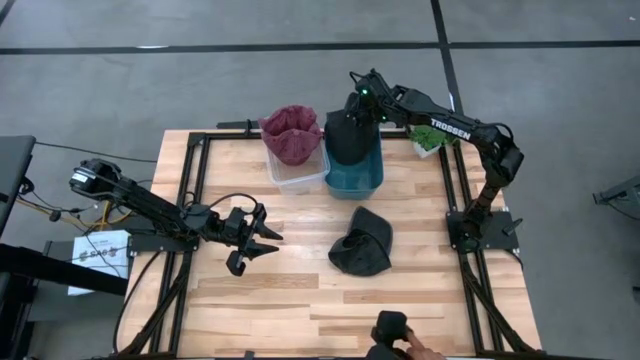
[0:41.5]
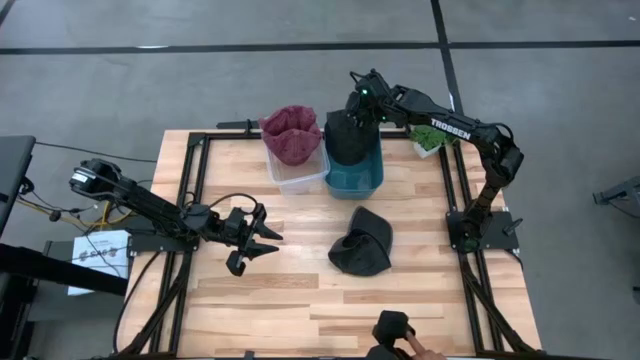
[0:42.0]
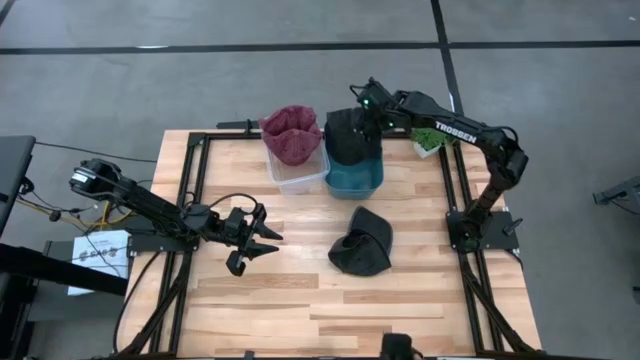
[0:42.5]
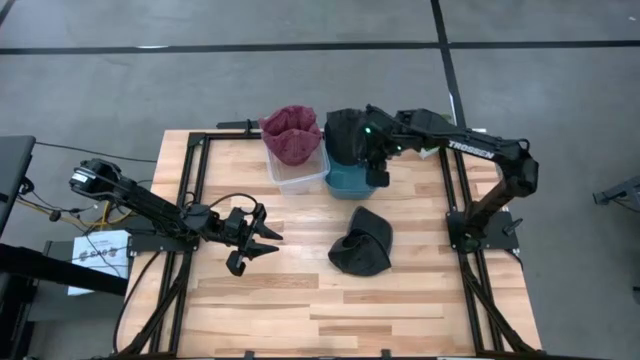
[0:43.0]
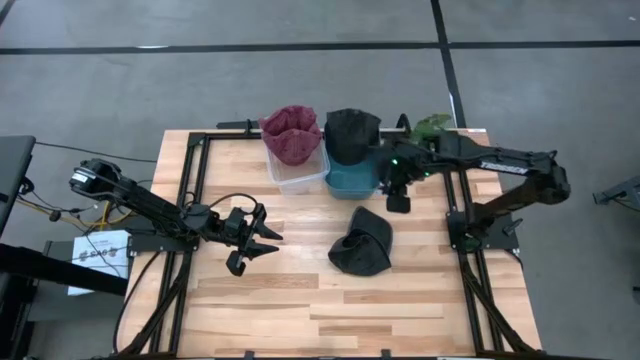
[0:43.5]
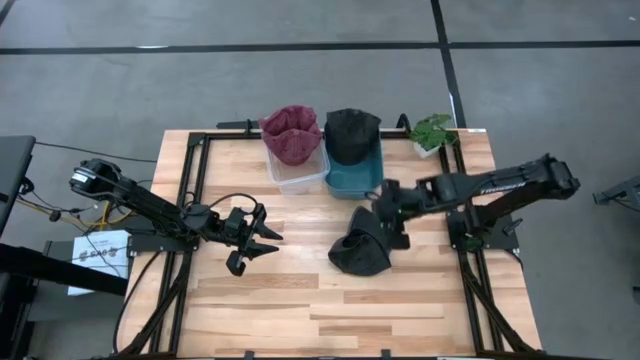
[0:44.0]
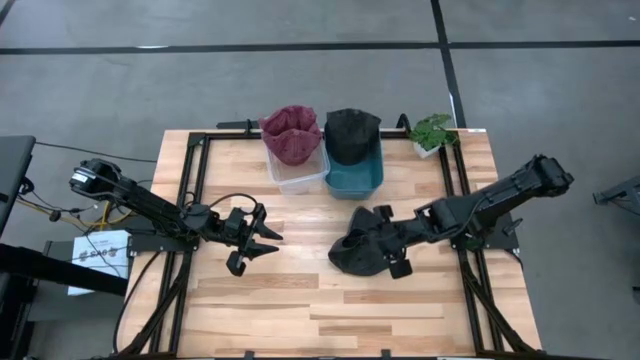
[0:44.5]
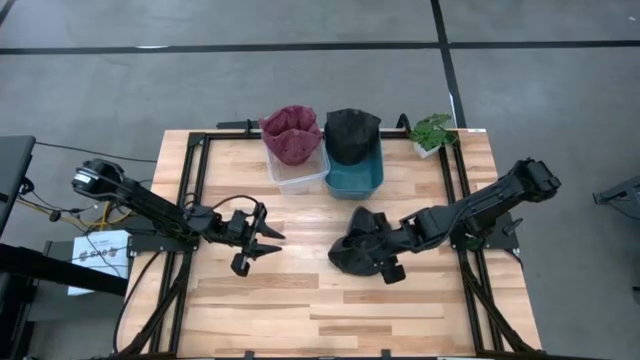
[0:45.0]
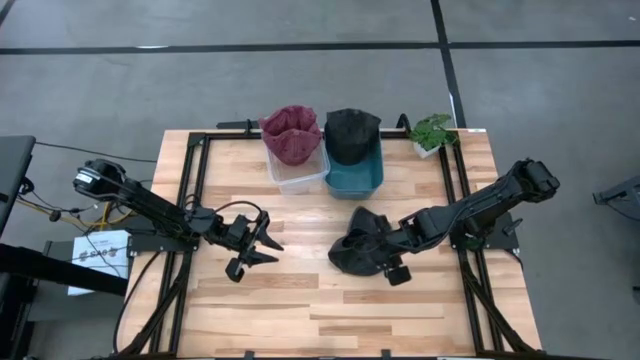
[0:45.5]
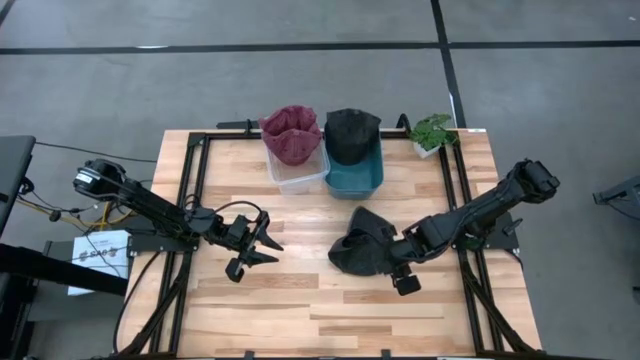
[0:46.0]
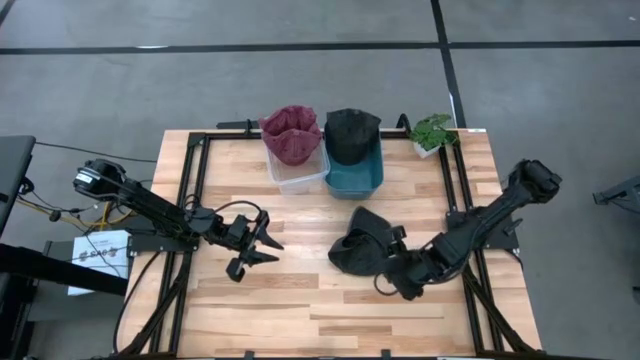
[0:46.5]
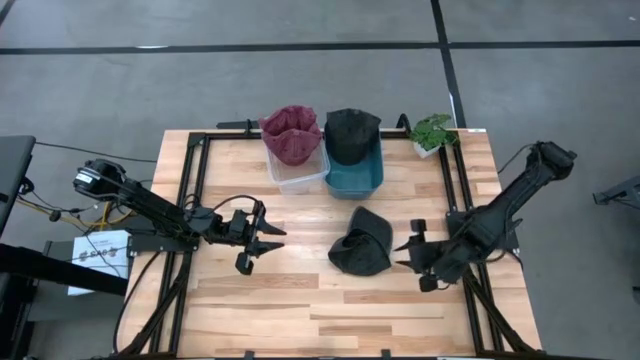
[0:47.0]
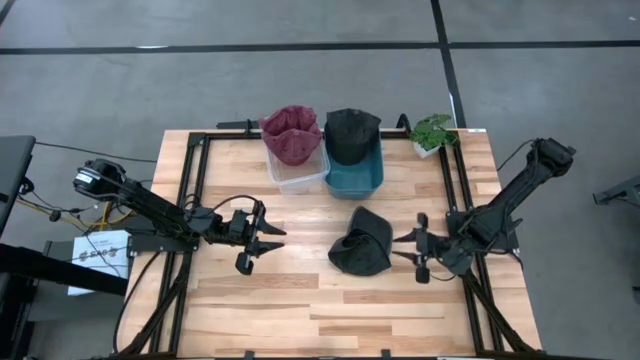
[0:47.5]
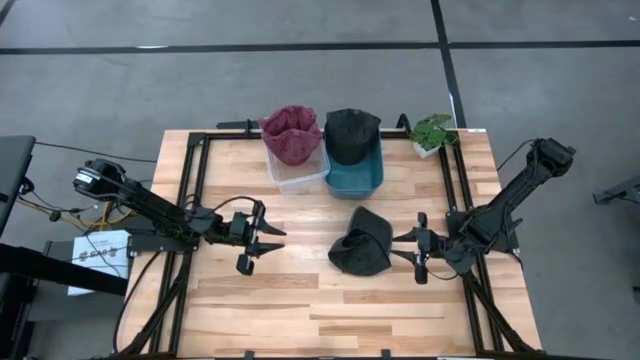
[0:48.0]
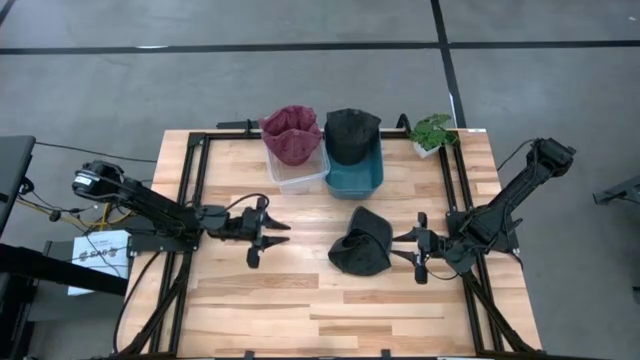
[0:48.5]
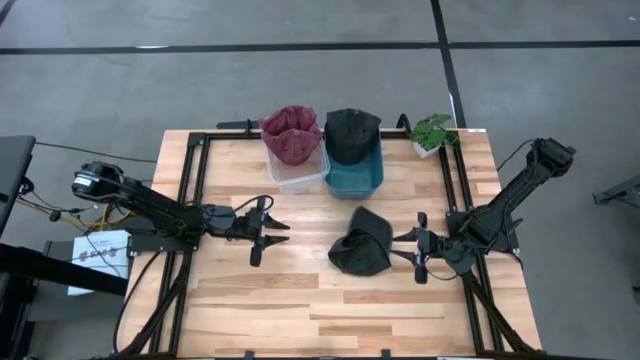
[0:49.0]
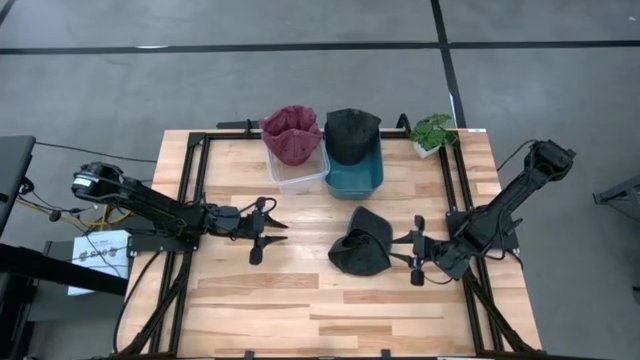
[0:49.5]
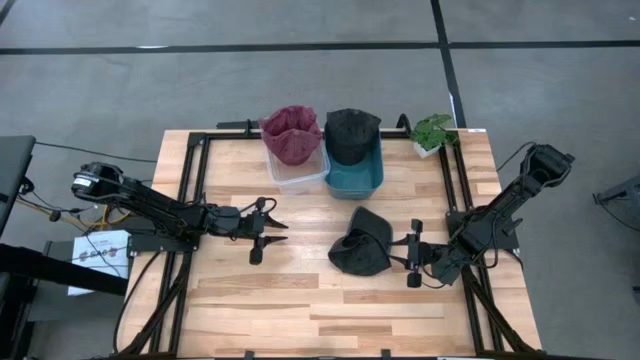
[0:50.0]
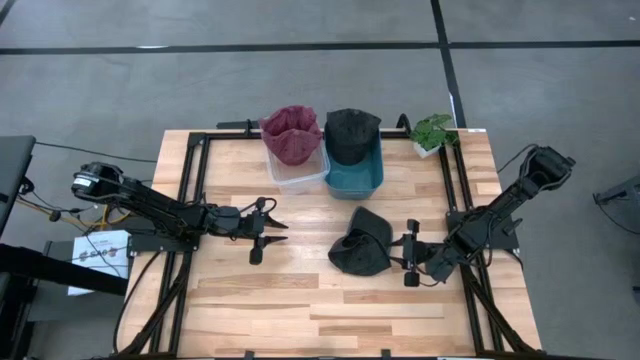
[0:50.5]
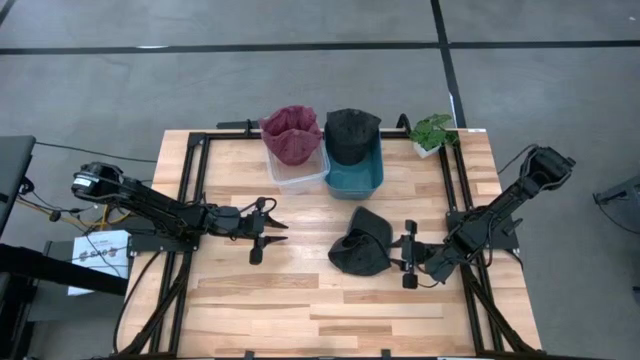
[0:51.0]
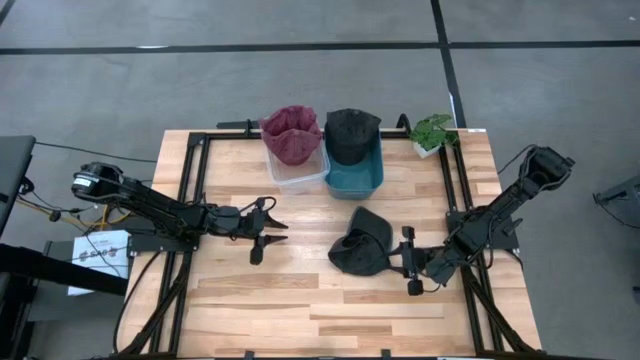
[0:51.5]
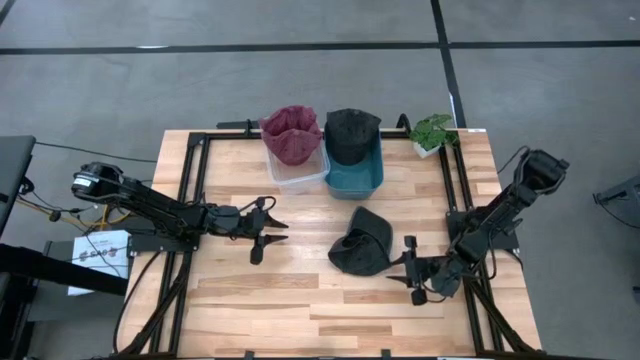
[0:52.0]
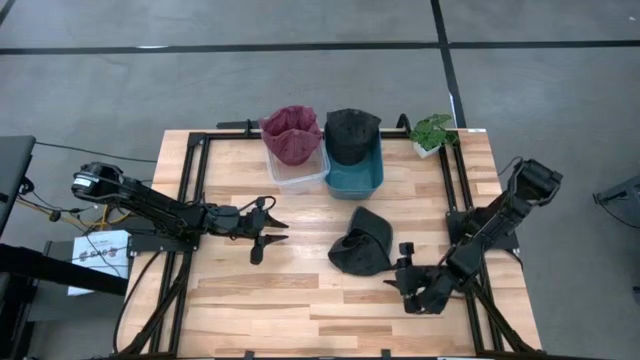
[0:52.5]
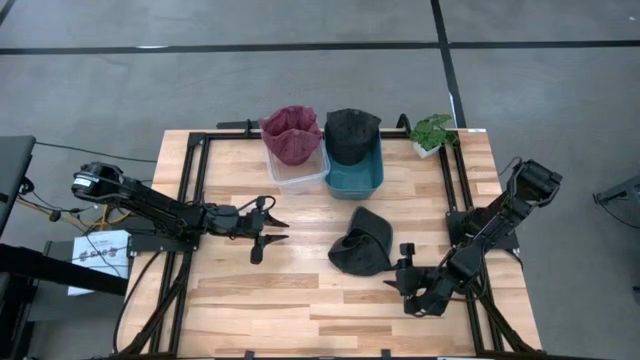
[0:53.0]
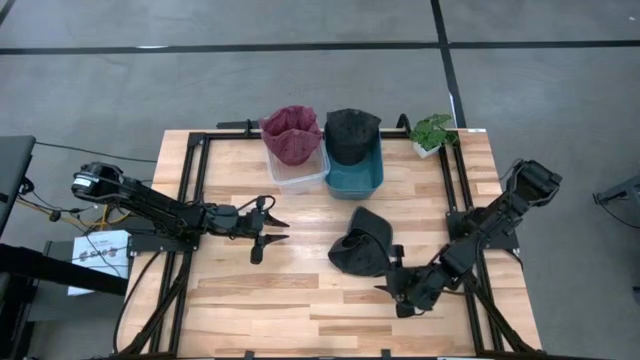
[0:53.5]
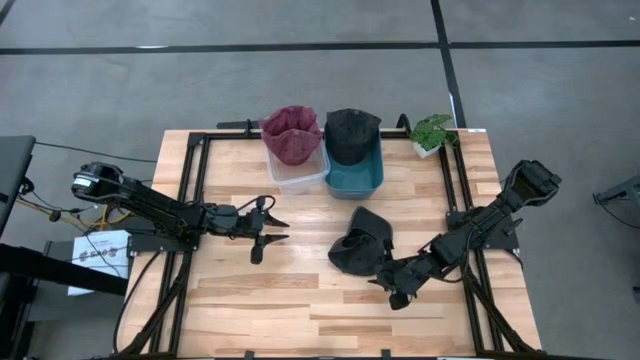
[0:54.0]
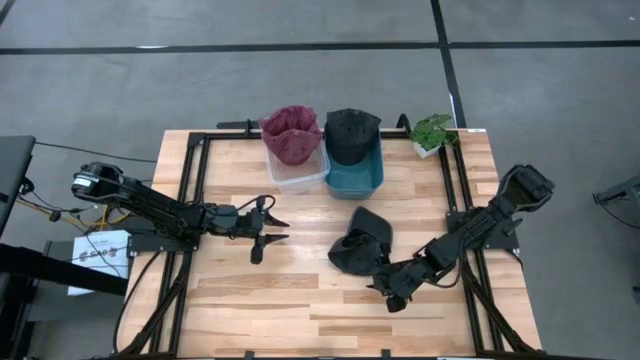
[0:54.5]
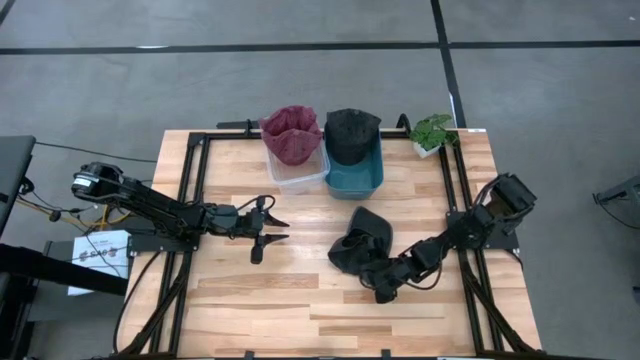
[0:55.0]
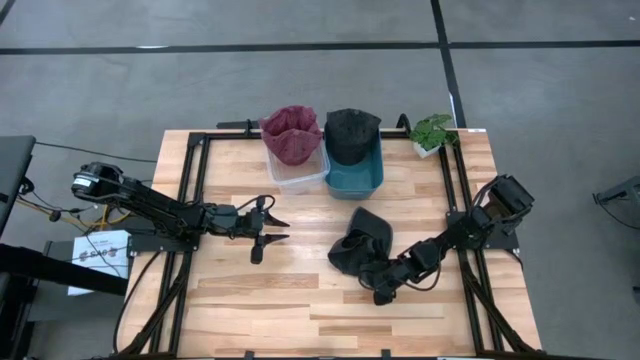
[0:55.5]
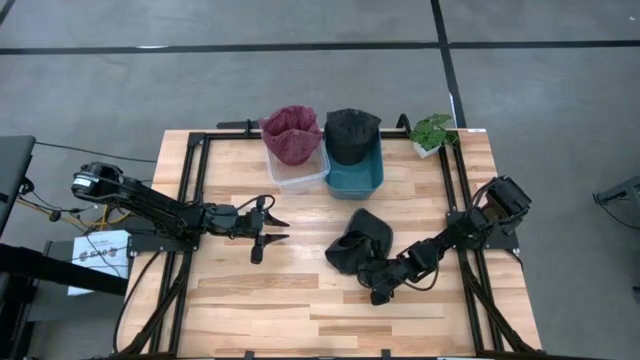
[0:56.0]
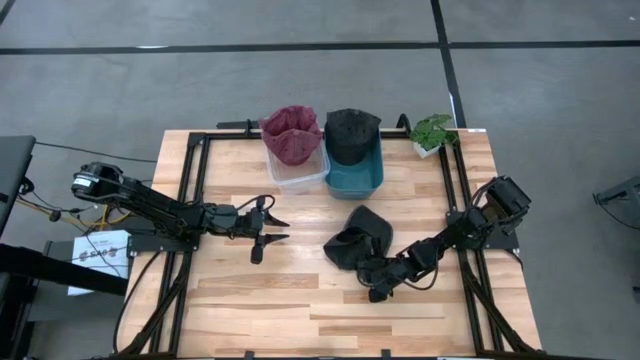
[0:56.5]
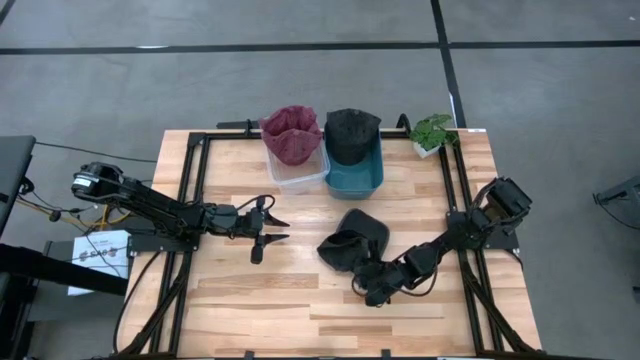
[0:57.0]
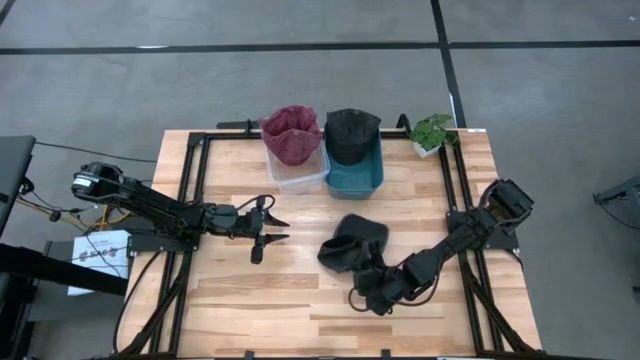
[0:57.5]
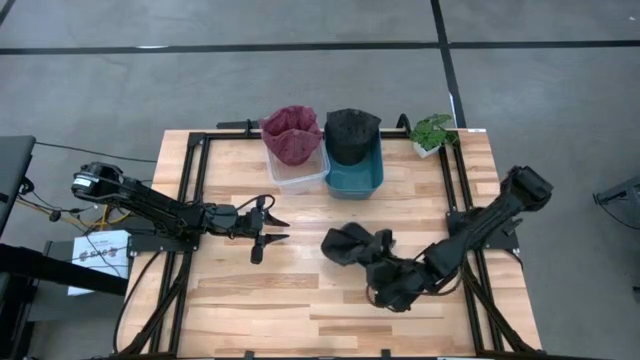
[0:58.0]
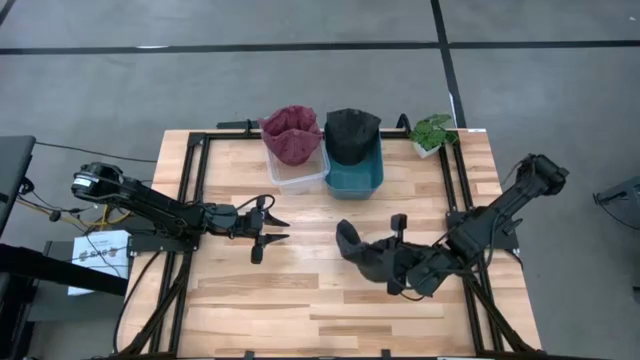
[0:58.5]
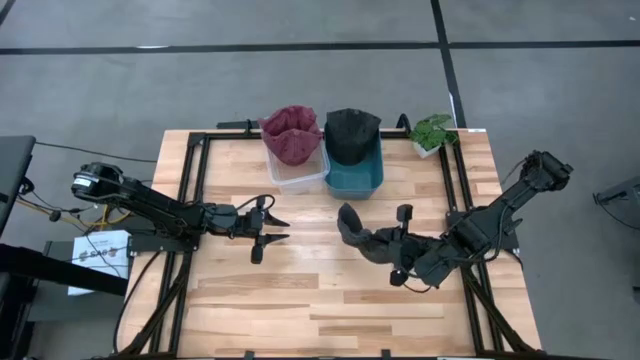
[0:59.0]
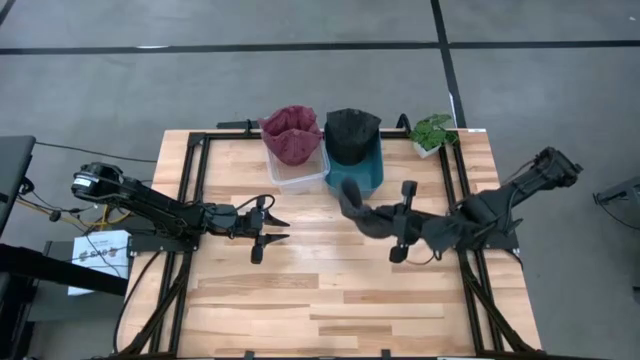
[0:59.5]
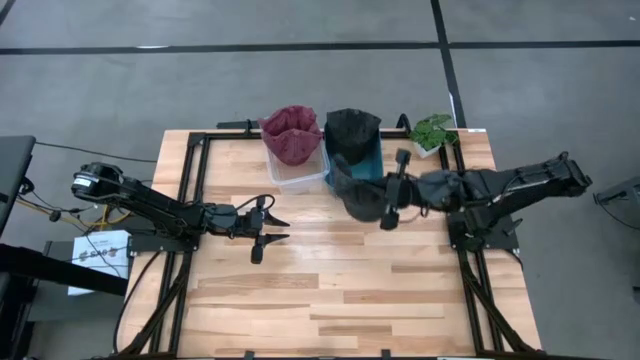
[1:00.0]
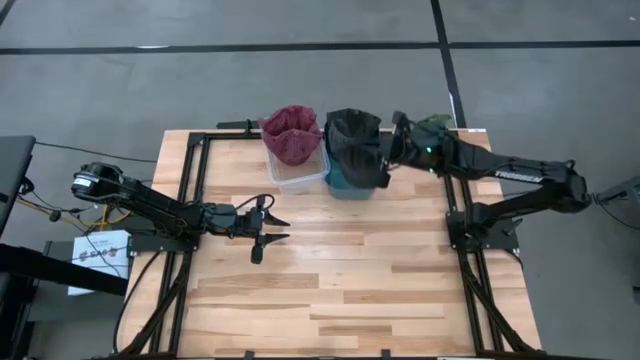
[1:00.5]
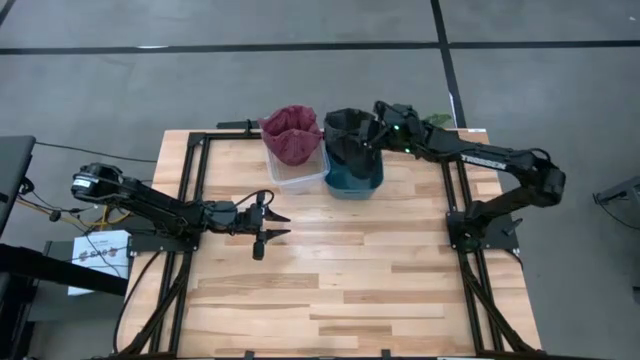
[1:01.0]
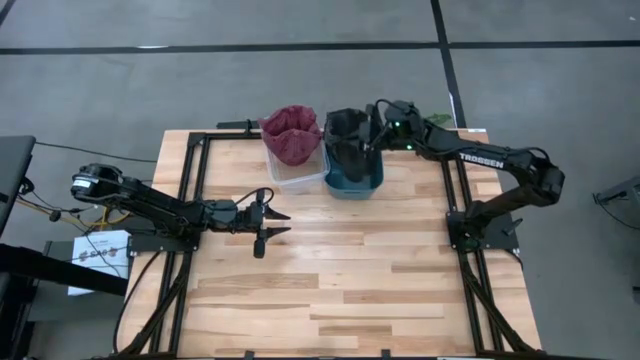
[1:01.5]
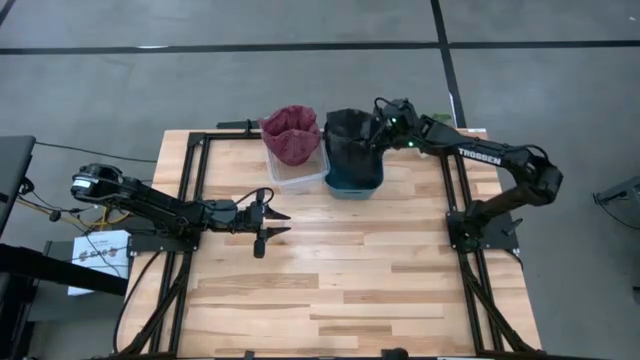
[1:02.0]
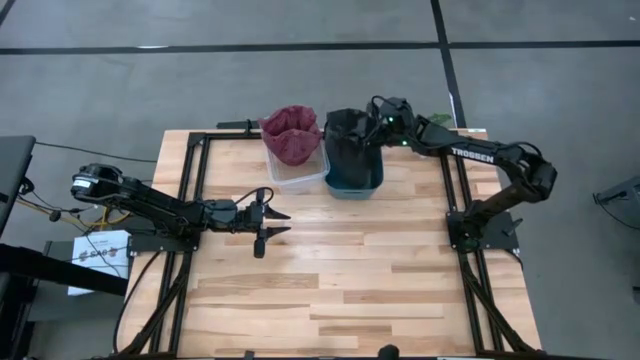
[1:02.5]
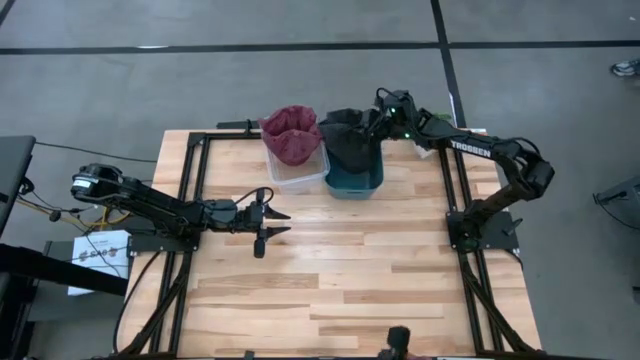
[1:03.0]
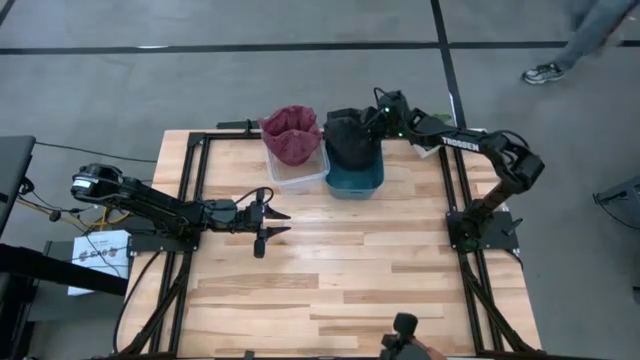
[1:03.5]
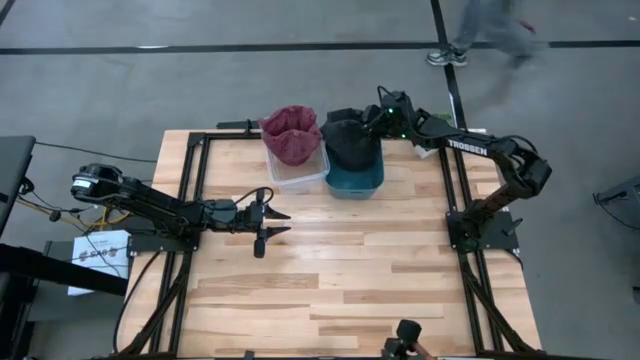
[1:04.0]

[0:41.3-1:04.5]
Task: Pick & Place hat
Put the black cap into the blue bin
